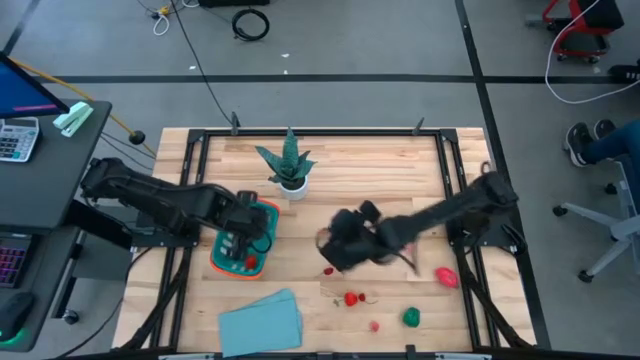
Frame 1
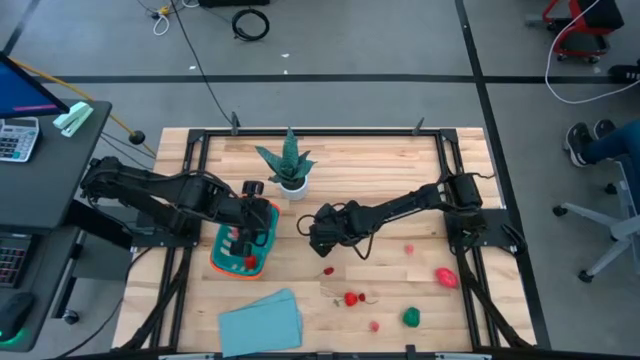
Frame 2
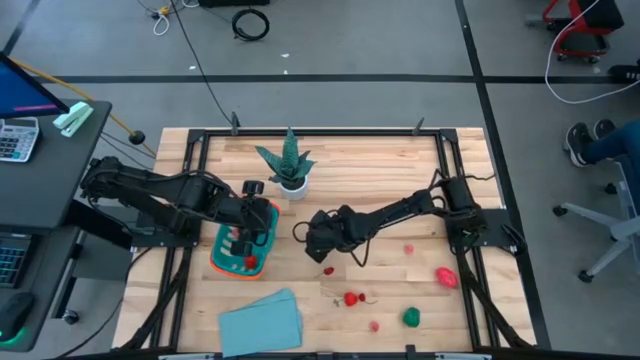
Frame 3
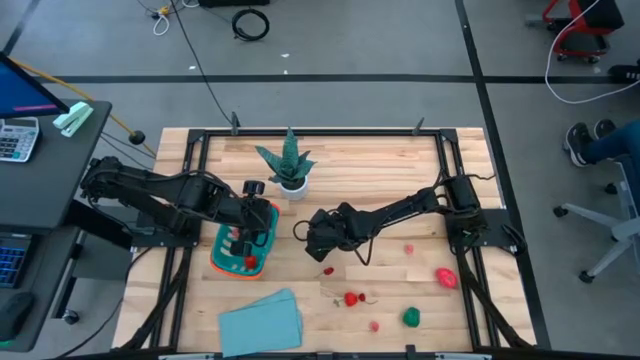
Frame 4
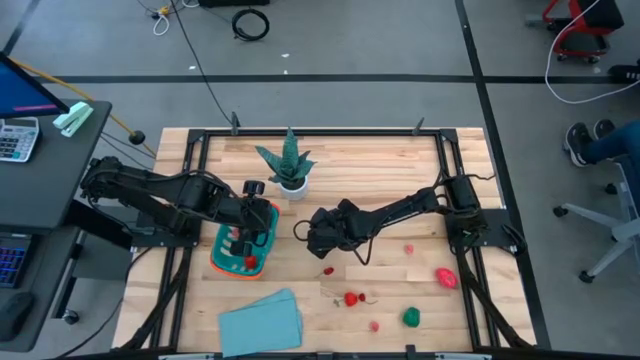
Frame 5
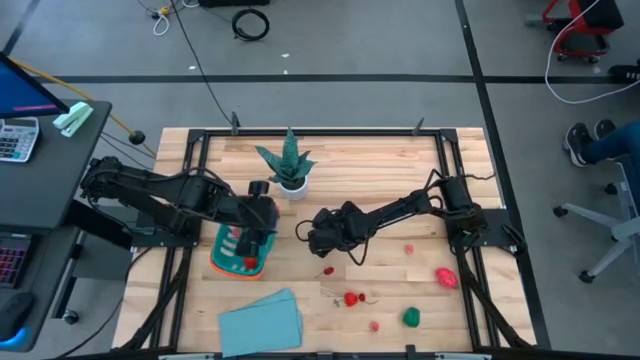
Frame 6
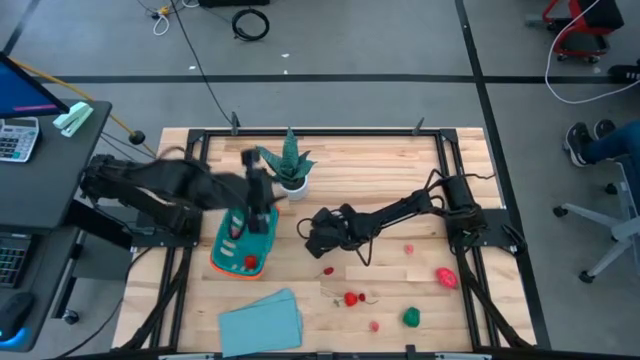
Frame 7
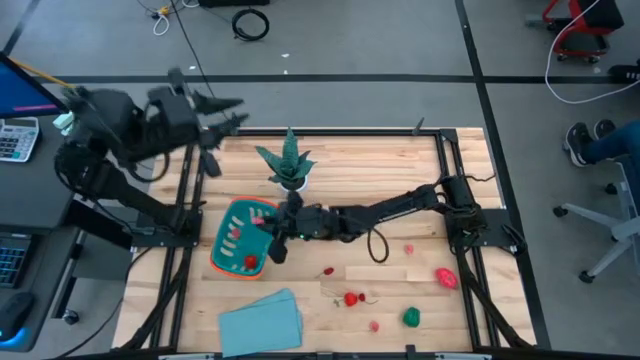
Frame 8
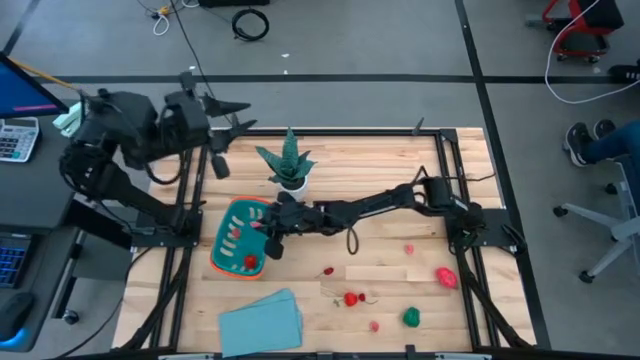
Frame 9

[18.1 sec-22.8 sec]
Task: Pick and placing Produce into tupperware
Put the pink peach into the blue basket

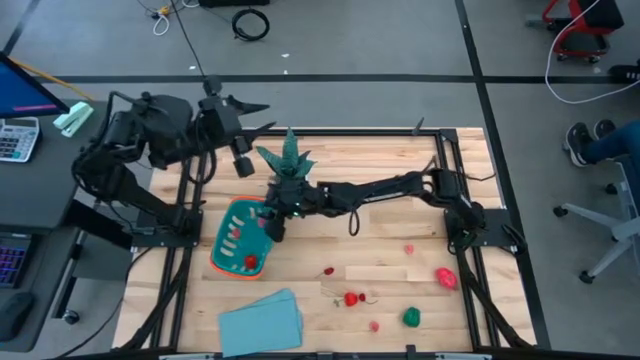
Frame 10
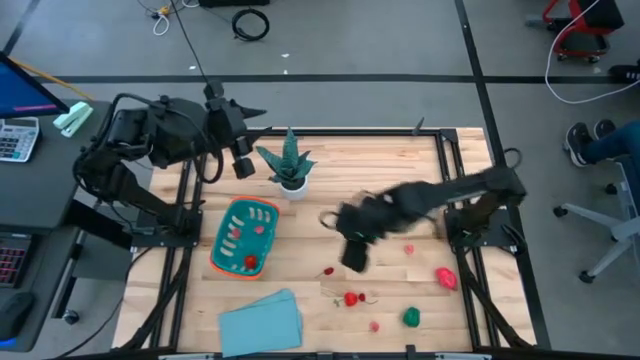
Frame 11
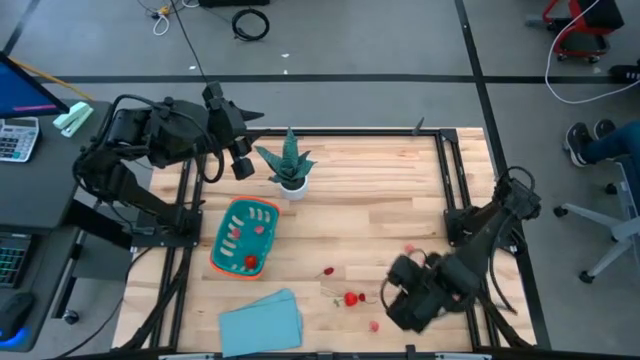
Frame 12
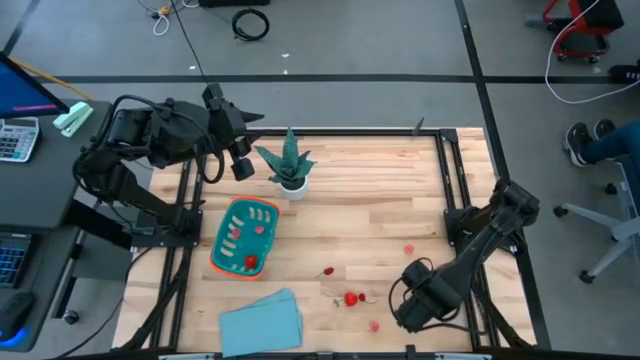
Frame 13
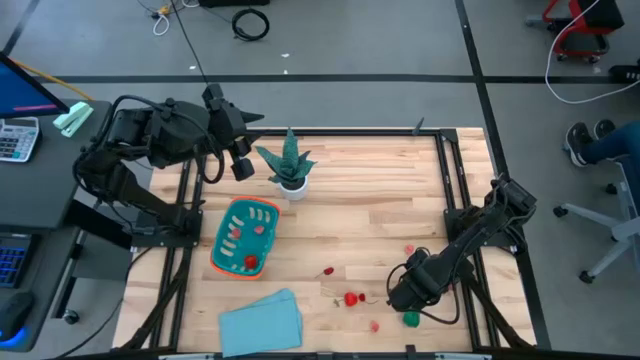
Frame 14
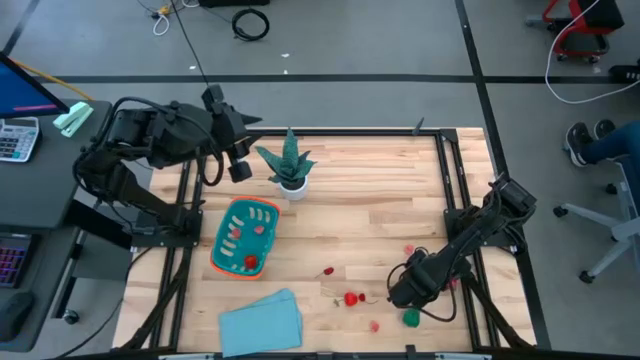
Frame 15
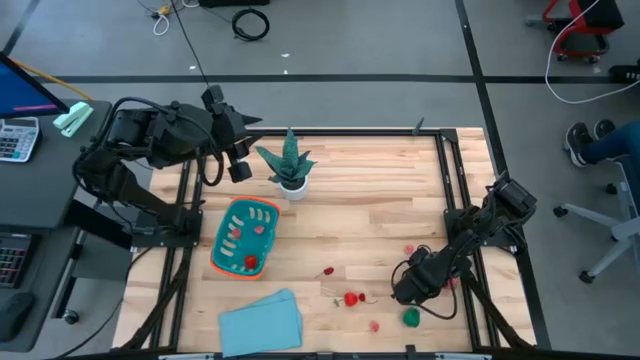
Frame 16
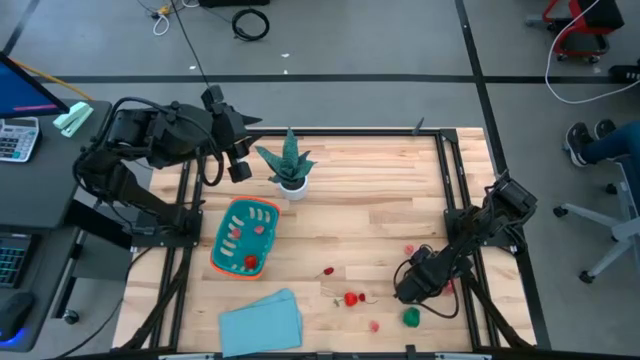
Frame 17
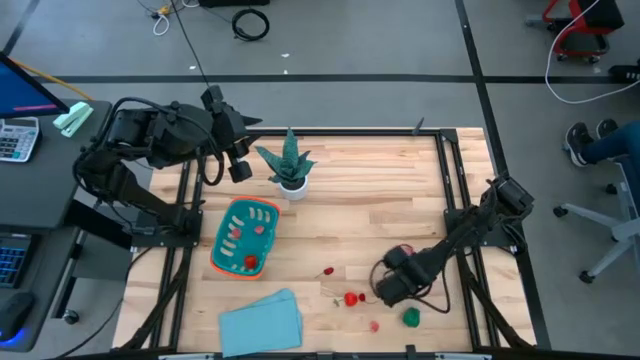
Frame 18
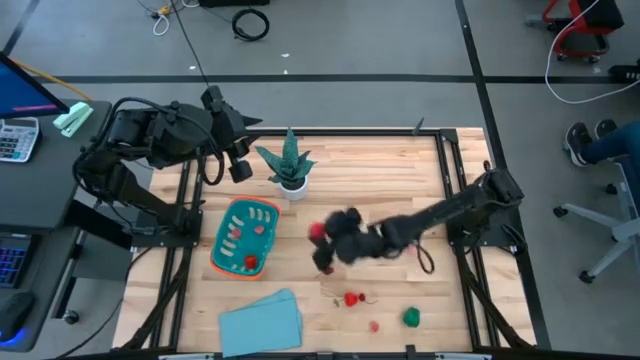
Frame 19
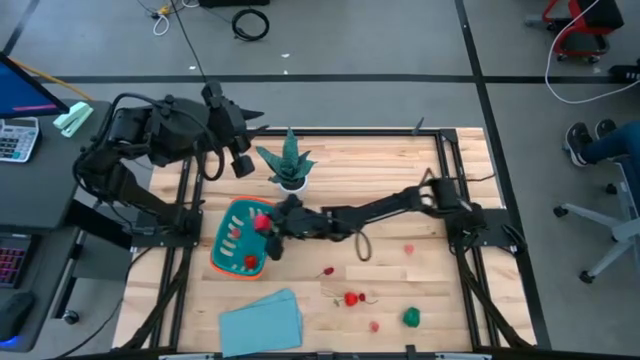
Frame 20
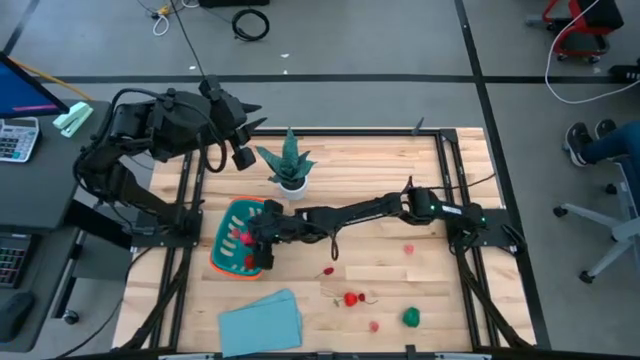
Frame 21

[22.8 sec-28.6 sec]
Put the red dragon fruit into the blue basket

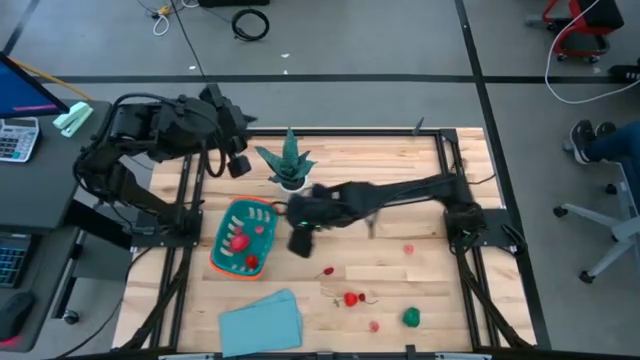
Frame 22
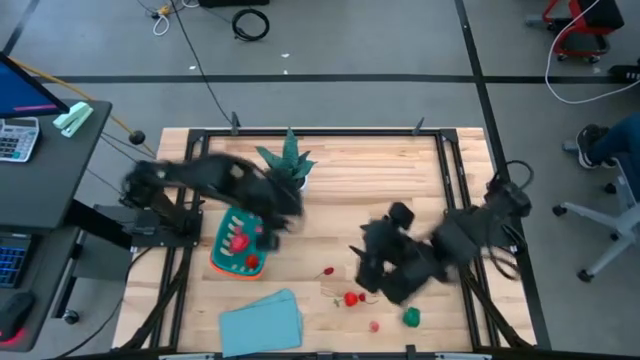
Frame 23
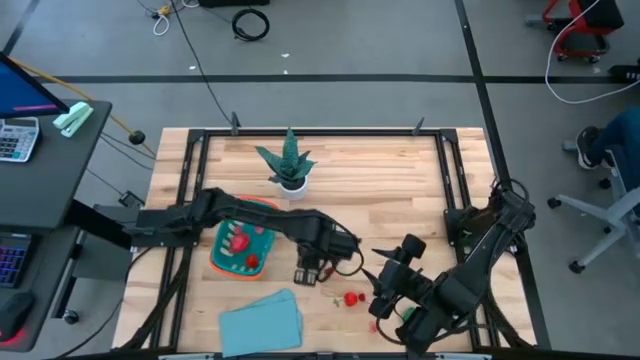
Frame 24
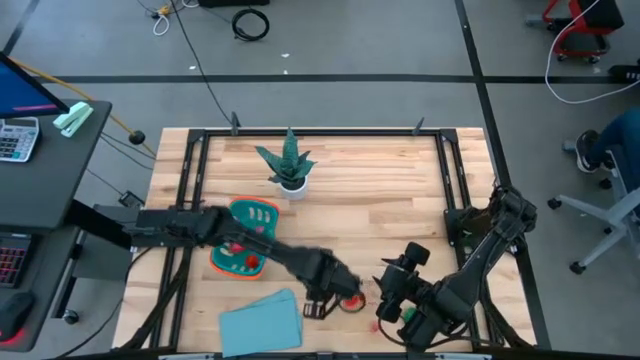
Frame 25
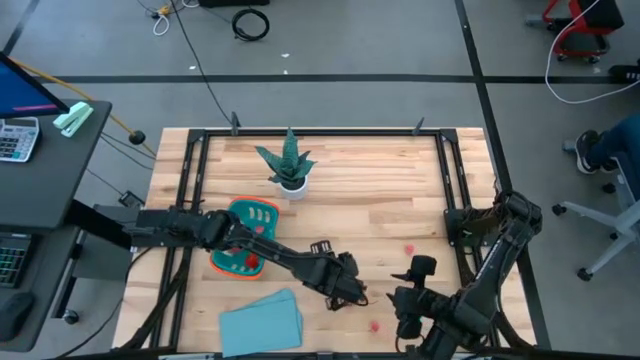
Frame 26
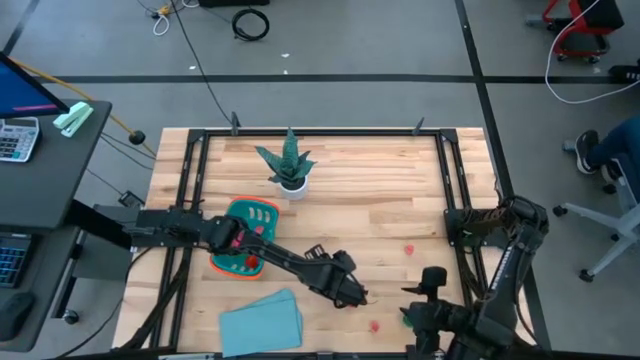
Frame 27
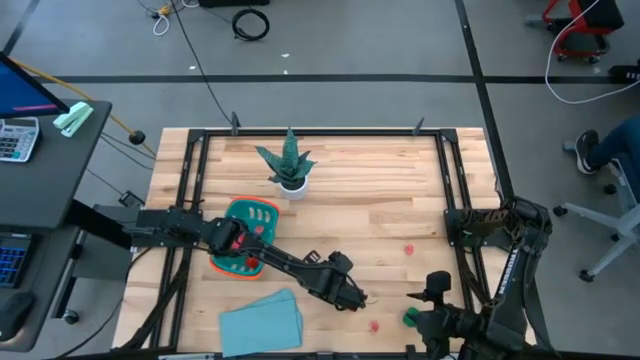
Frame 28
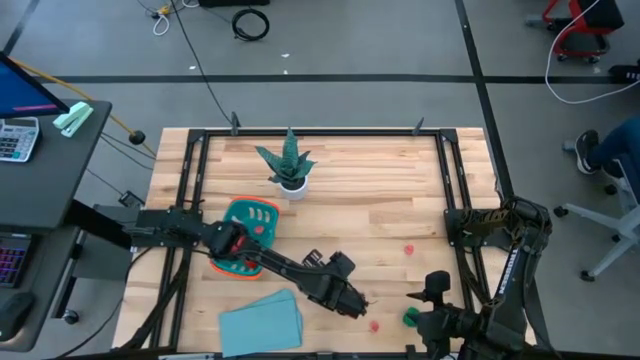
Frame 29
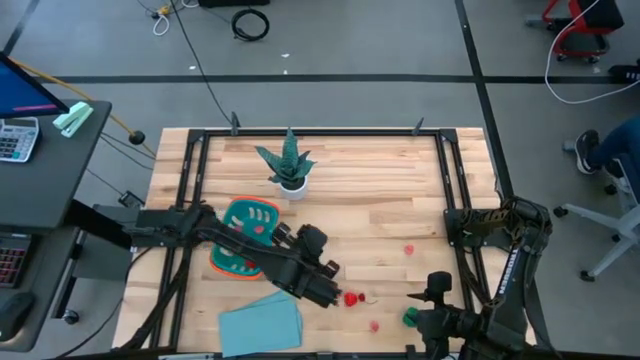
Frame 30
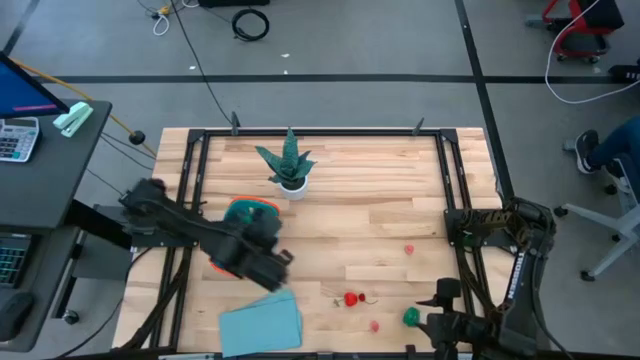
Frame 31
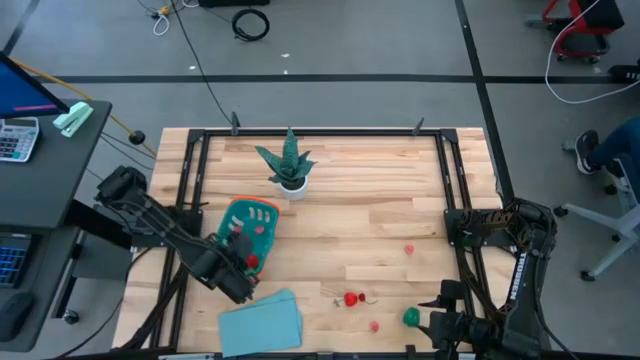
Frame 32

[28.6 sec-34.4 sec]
Put the red cherry into the blue basket

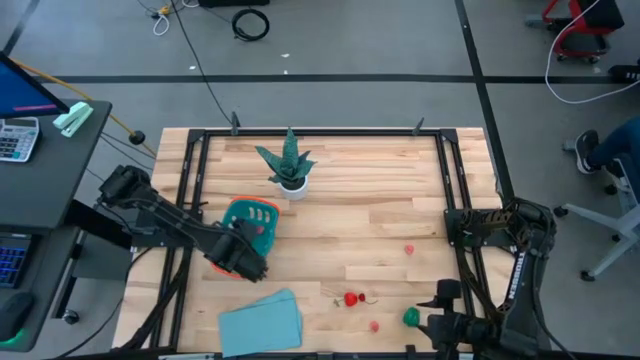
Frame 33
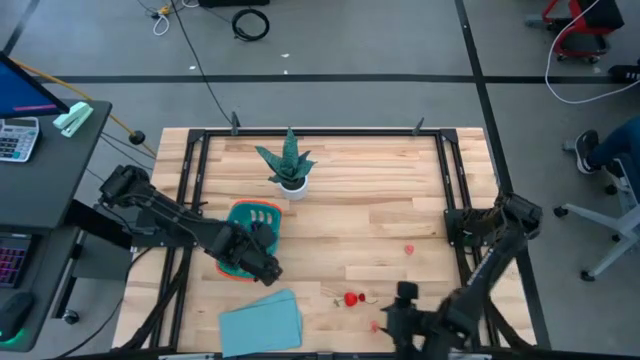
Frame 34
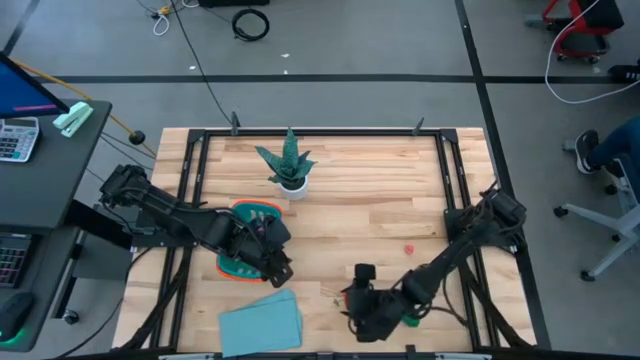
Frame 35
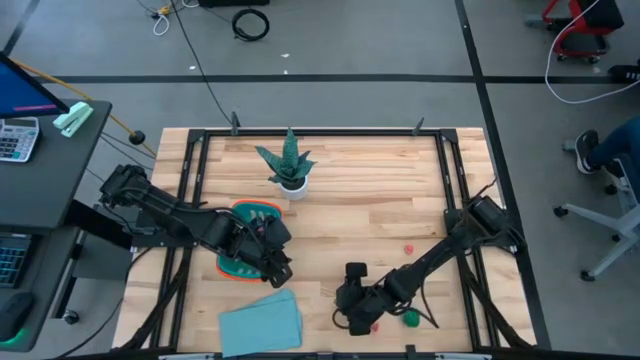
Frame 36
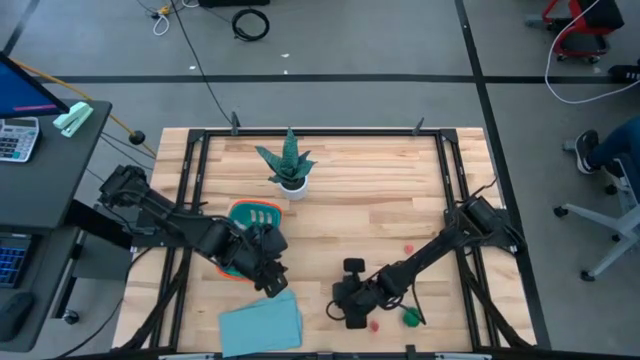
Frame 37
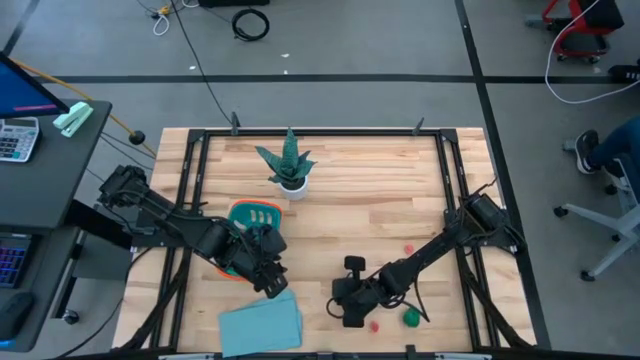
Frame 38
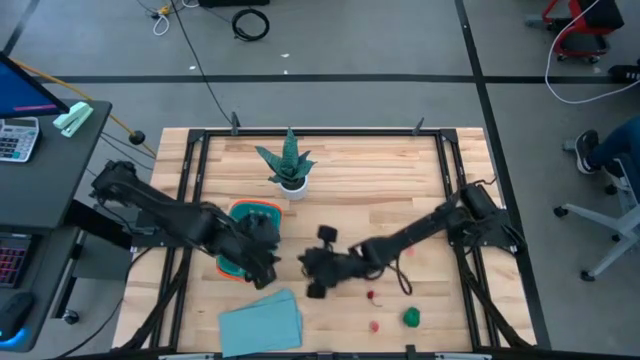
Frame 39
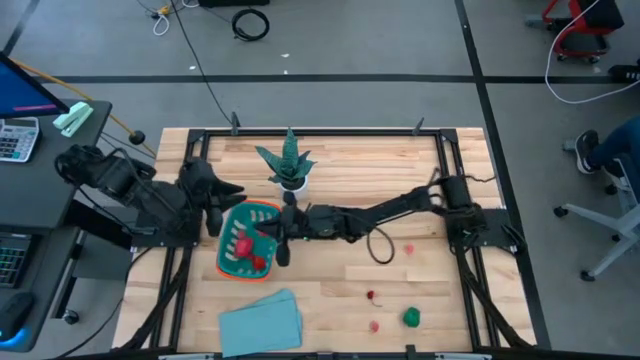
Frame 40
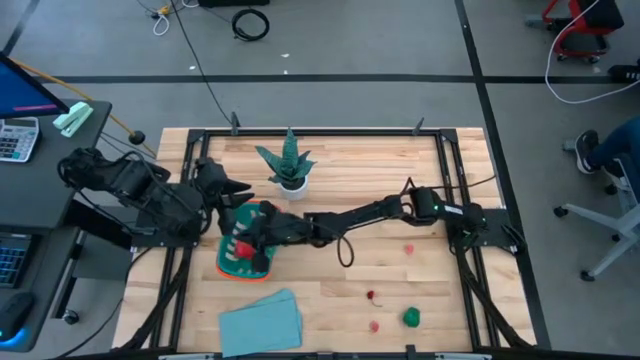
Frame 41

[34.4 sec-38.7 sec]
Put the red strawberry into the blue basket
